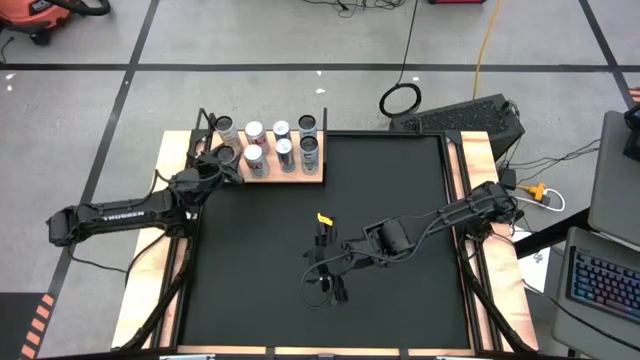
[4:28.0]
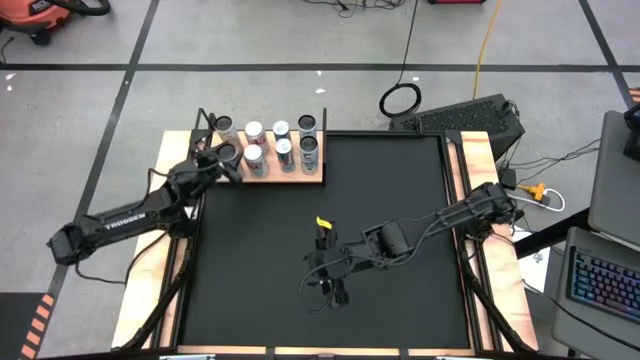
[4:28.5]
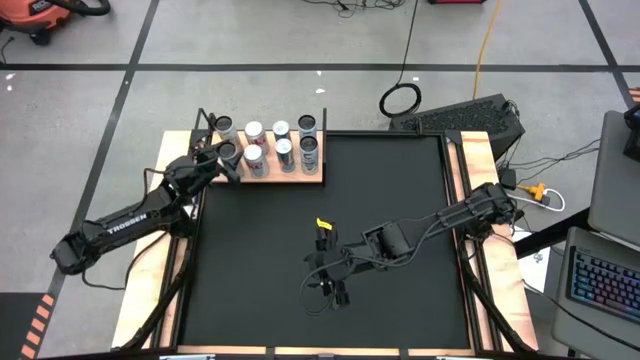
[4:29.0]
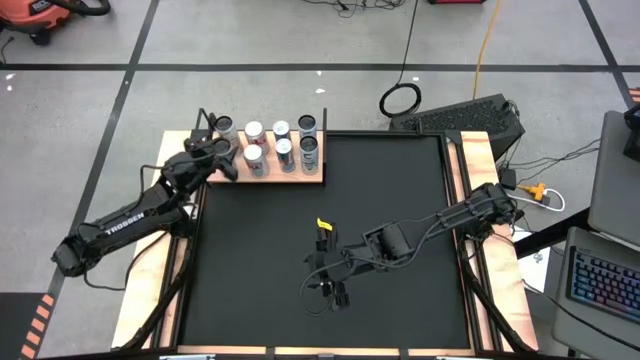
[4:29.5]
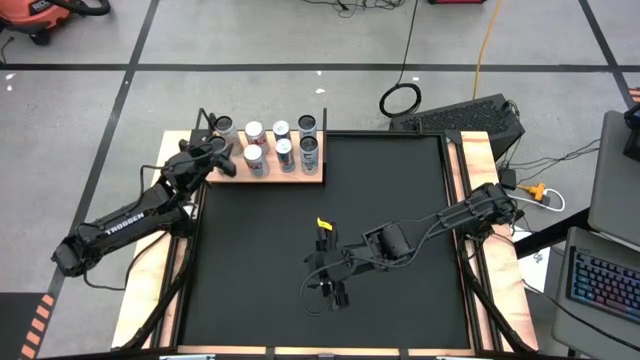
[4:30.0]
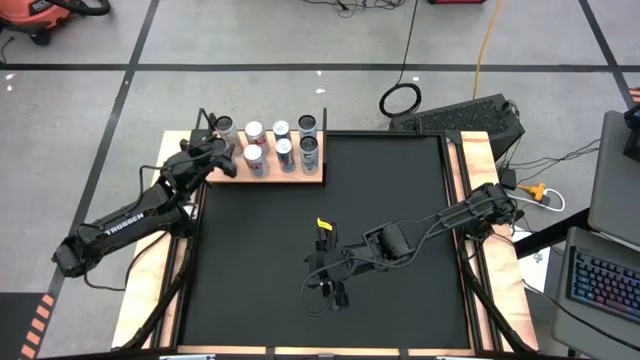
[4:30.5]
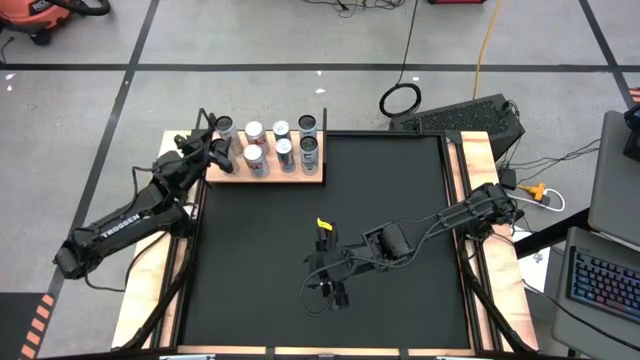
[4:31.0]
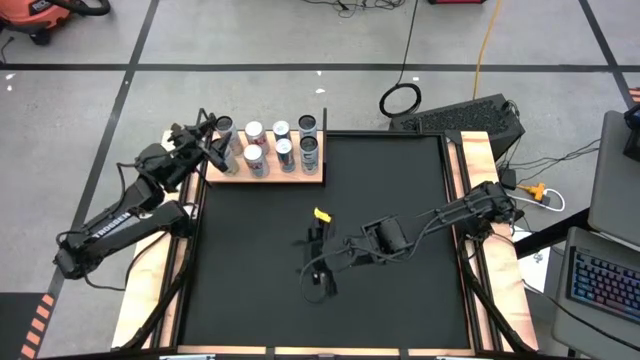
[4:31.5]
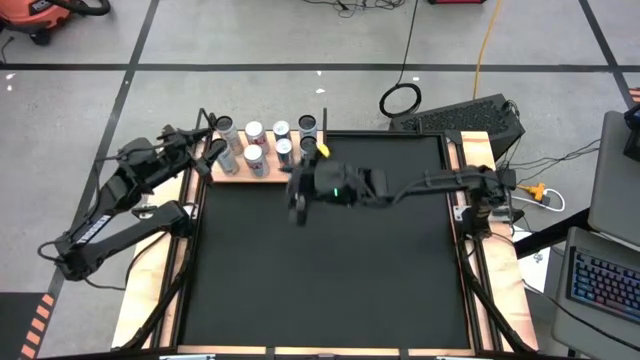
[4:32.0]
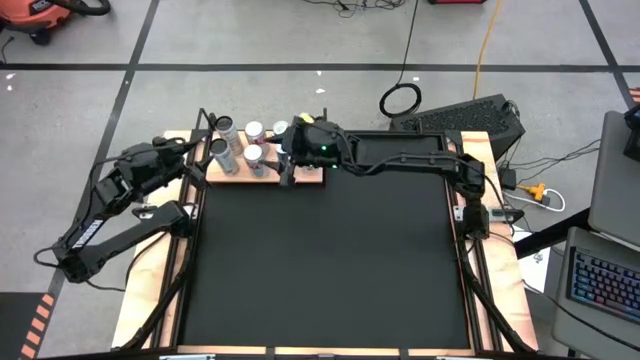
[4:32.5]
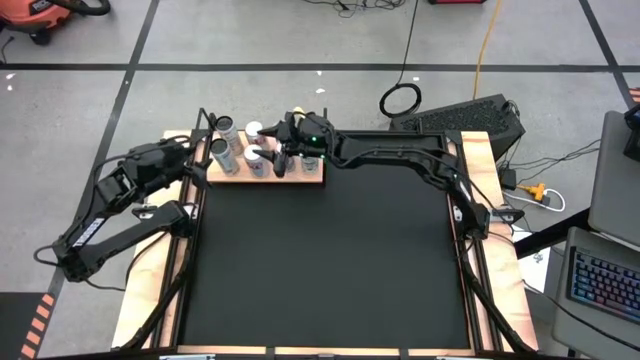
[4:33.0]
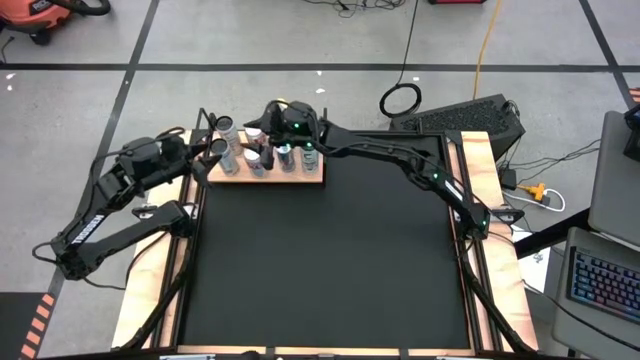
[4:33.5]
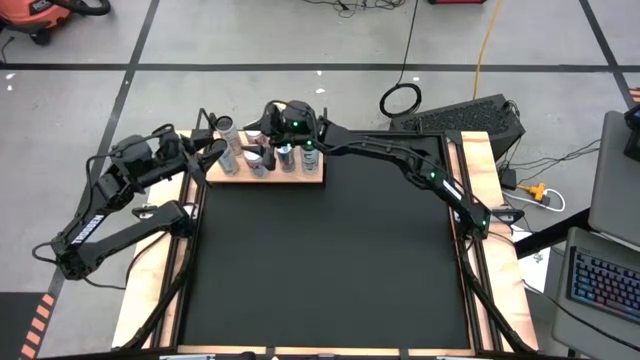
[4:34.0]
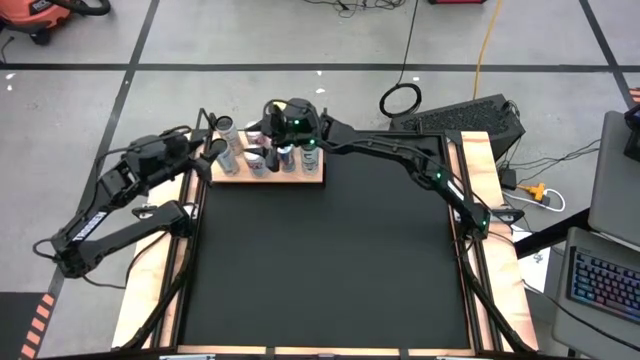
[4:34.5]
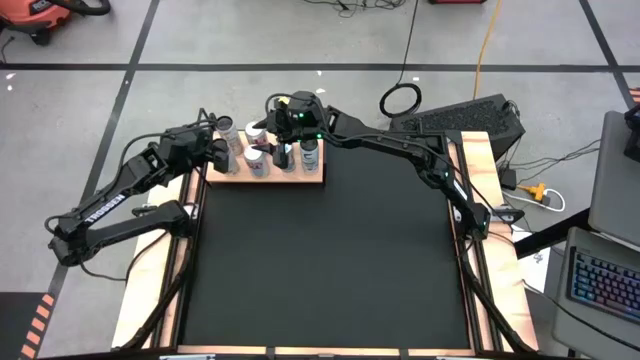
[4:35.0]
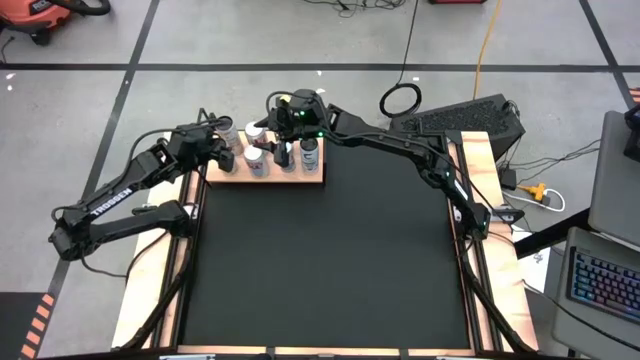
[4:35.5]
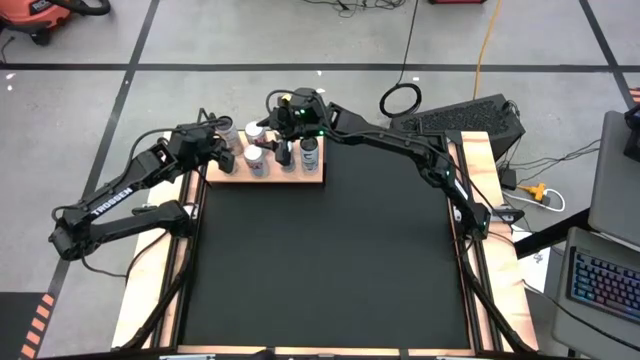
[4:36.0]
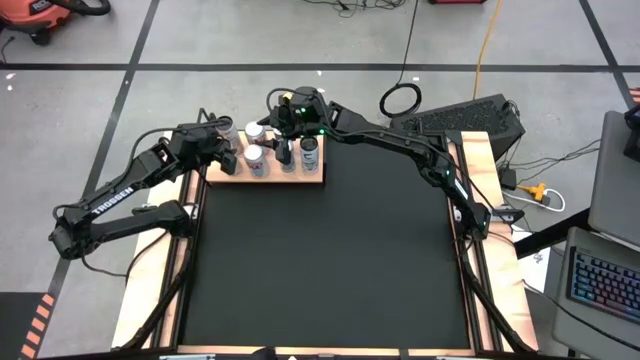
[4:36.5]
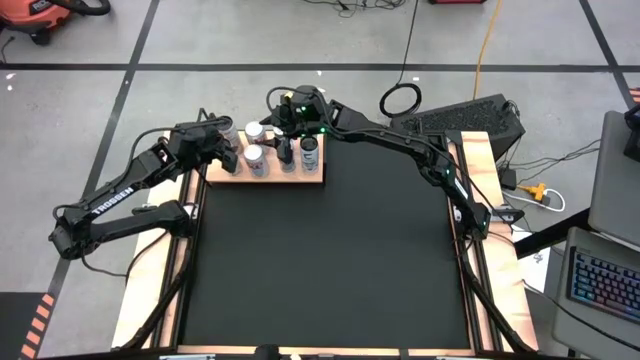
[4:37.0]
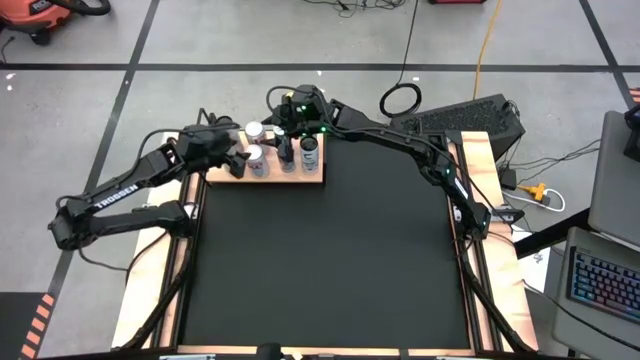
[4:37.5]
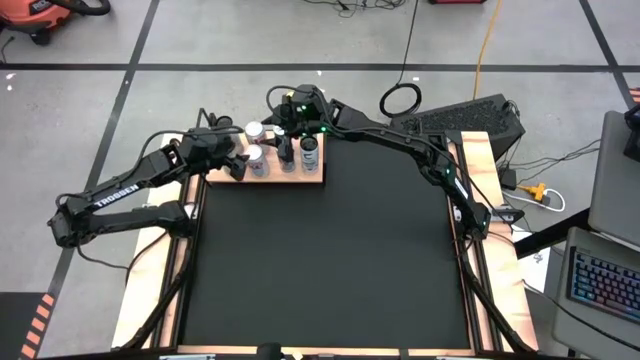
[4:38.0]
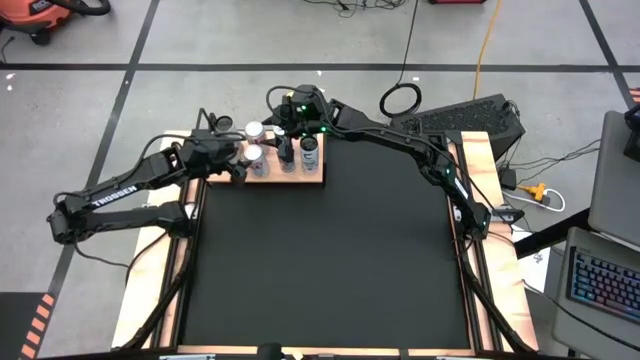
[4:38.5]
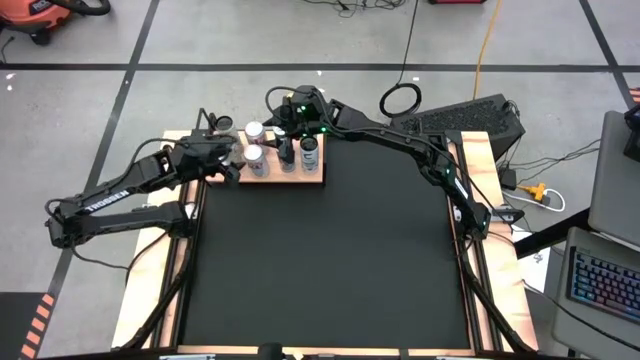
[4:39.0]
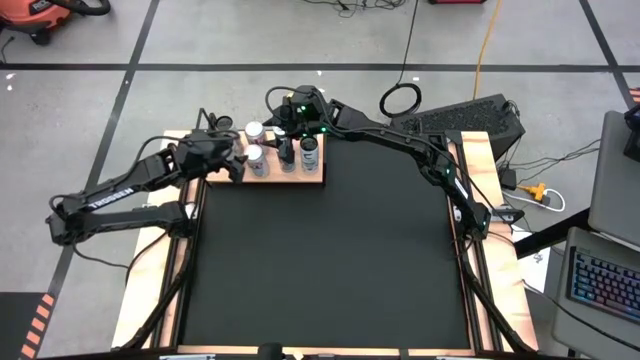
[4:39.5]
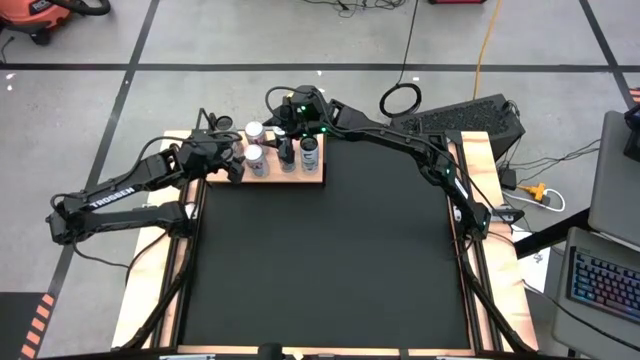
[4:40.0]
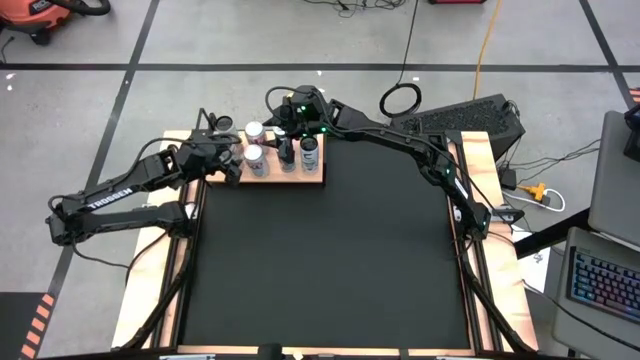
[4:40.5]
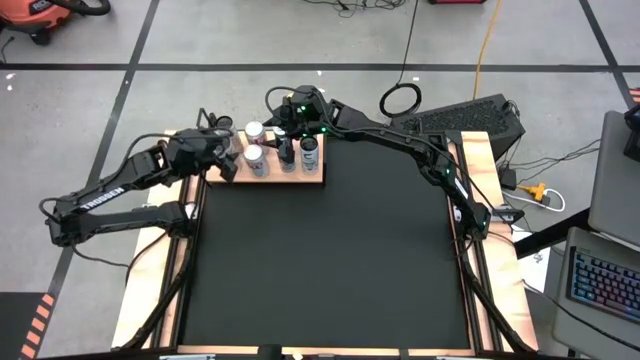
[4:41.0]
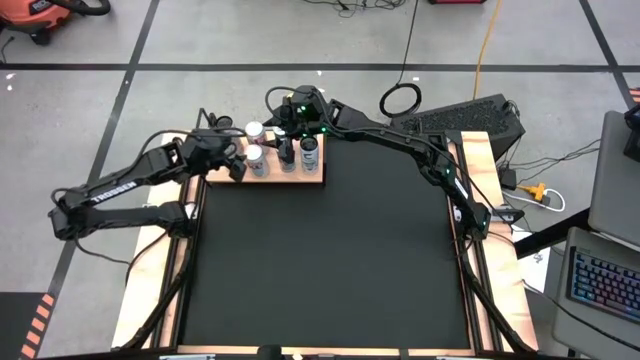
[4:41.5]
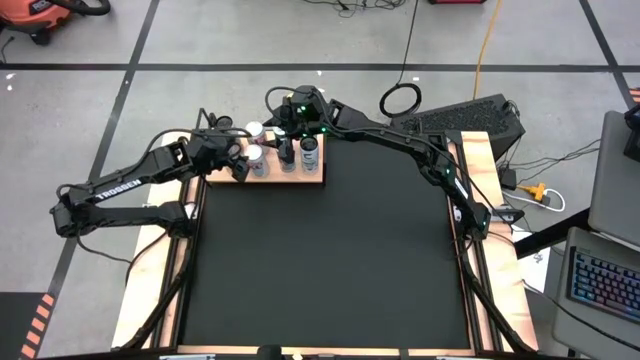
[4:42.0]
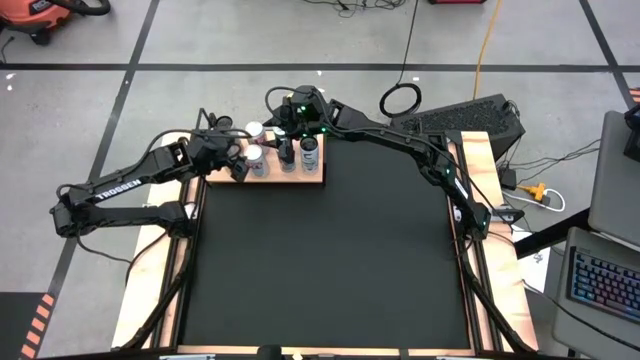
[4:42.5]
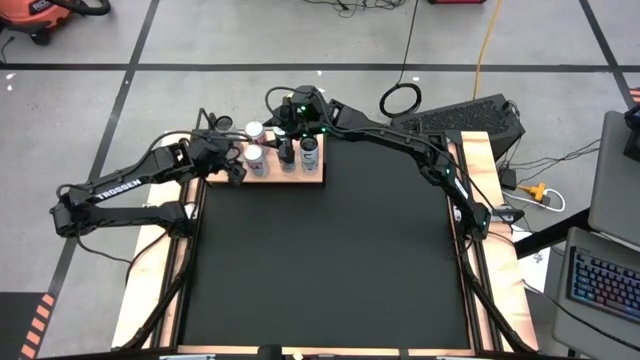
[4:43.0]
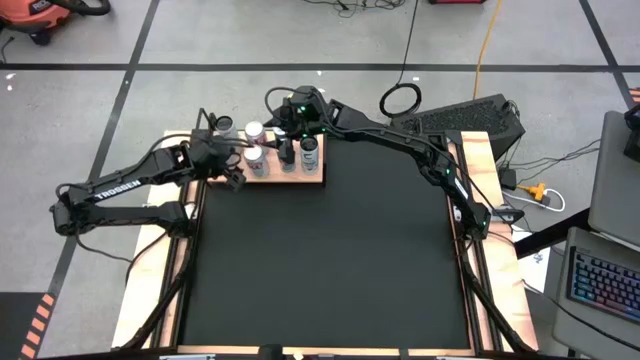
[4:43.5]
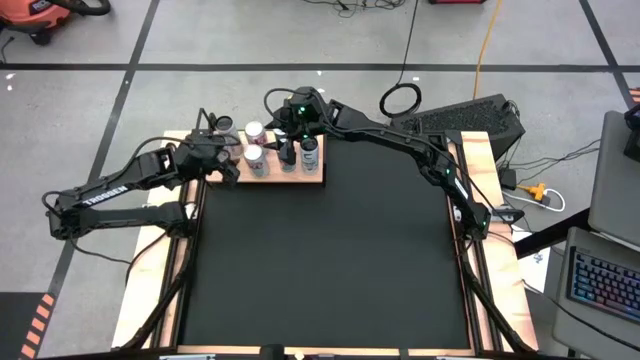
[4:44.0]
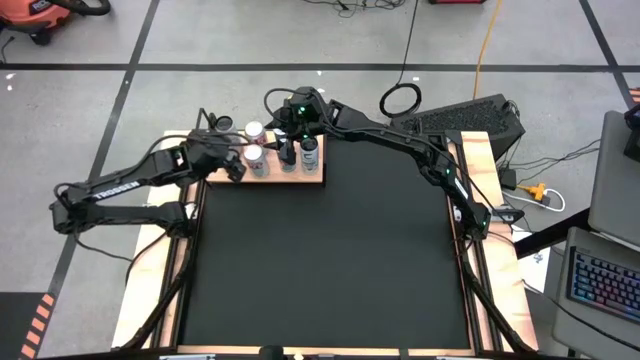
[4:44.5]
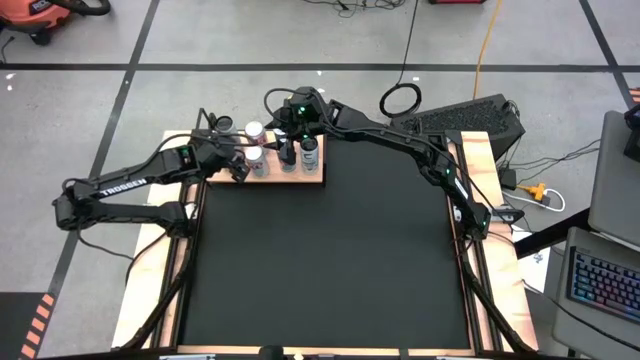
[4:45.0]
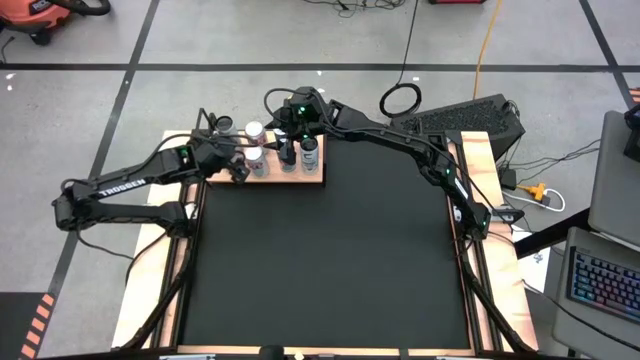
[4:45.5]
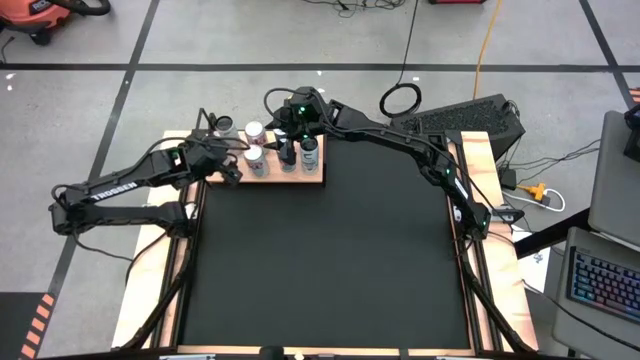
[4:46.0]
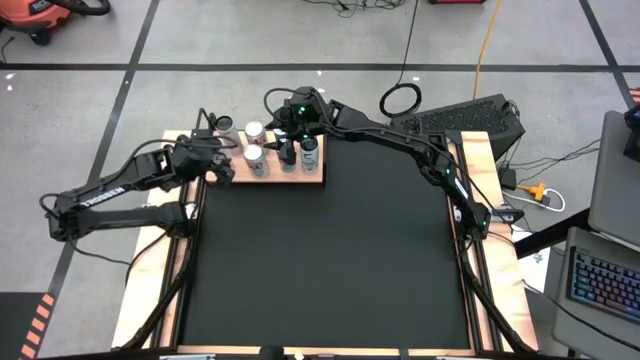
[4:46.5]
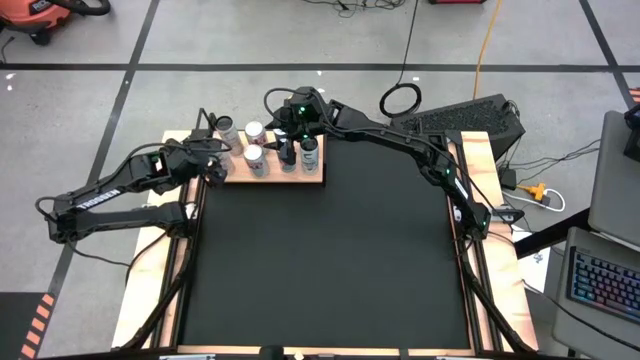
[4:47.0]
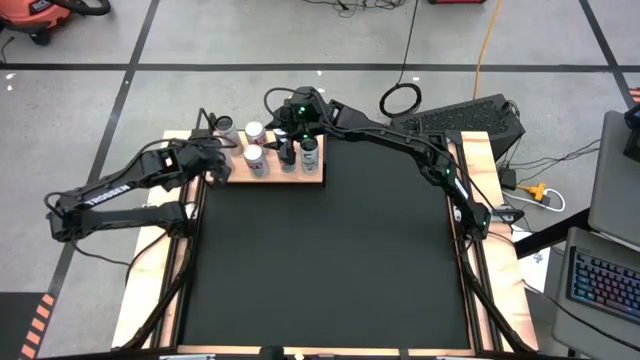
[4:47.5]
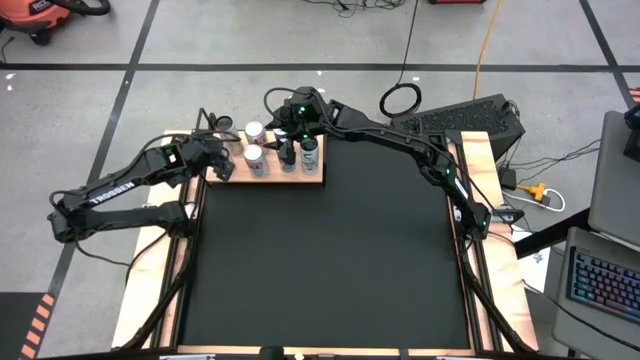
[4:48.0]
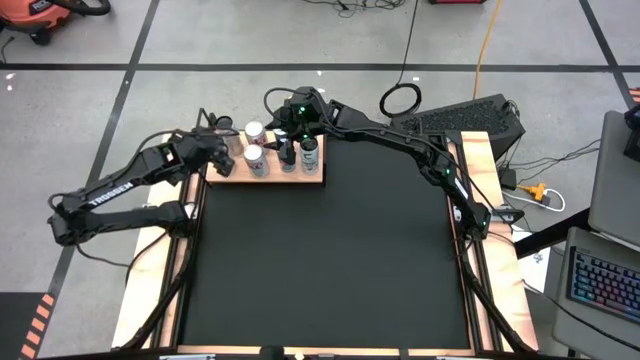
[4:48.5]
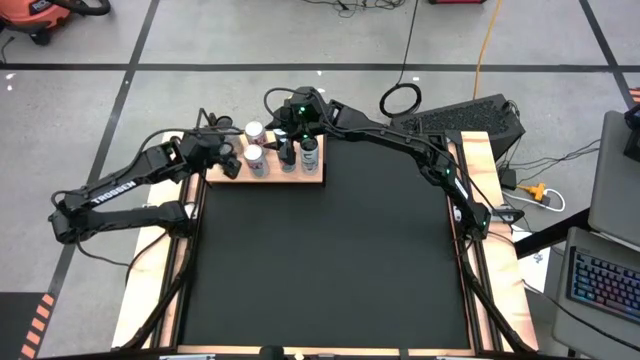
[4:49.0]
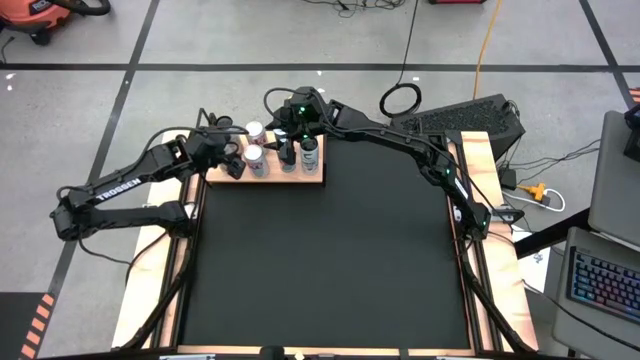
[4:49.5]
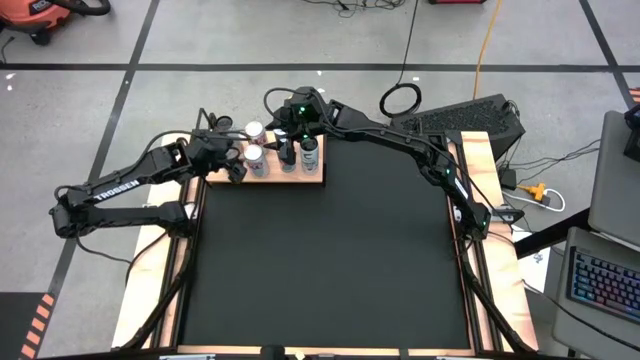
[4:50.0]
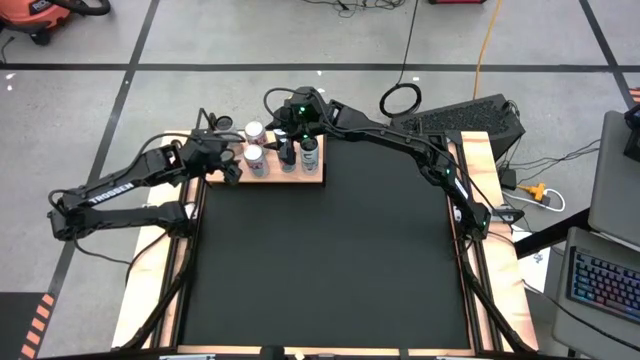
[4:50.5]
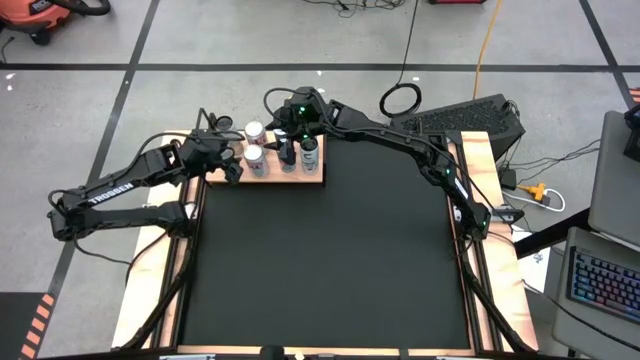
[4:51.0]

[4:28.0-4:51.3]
Task: Place canned beverage on shelf
Align the white and yellow soda can with the other white and yellow soda can on the shelf
